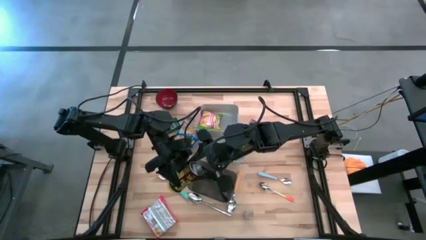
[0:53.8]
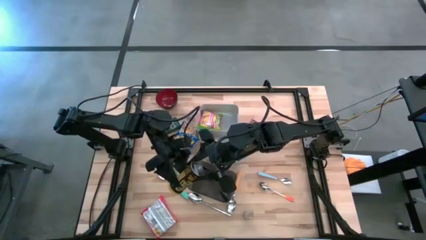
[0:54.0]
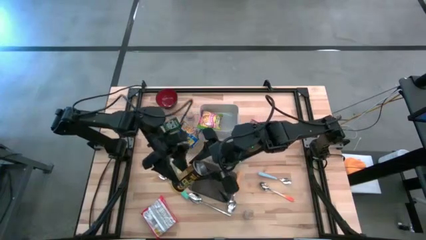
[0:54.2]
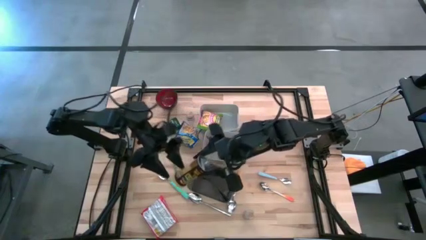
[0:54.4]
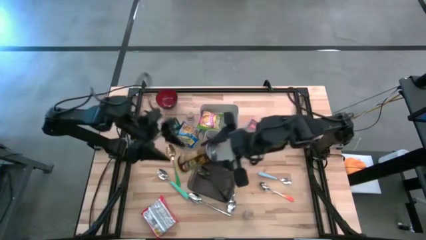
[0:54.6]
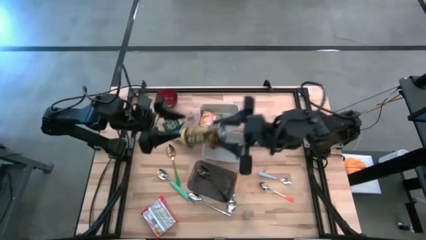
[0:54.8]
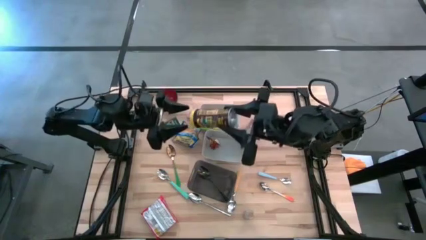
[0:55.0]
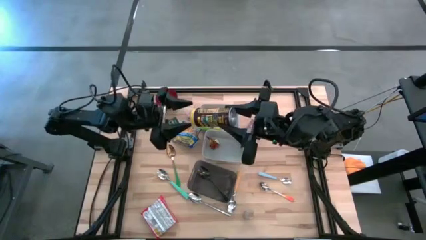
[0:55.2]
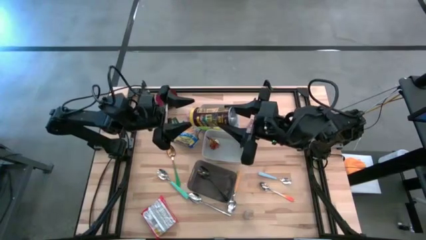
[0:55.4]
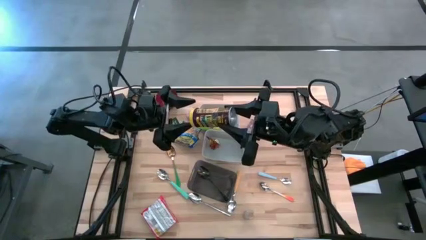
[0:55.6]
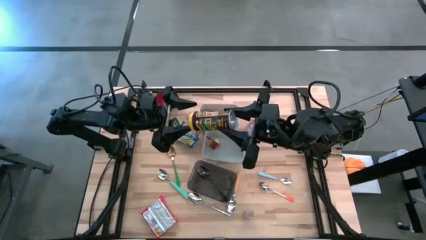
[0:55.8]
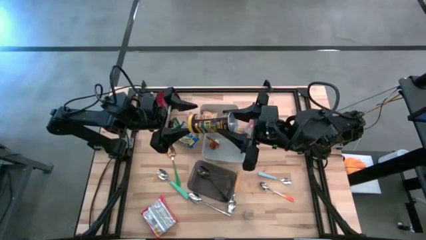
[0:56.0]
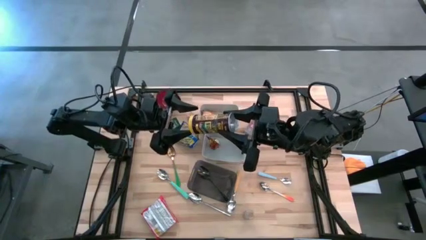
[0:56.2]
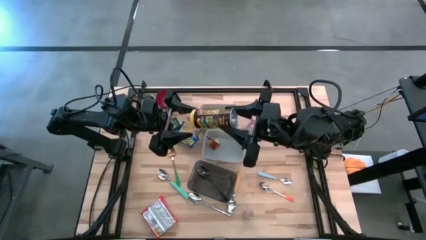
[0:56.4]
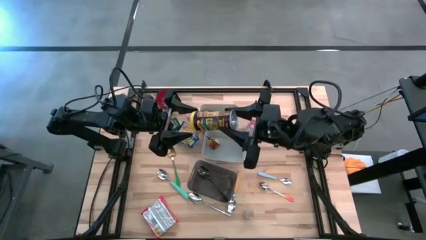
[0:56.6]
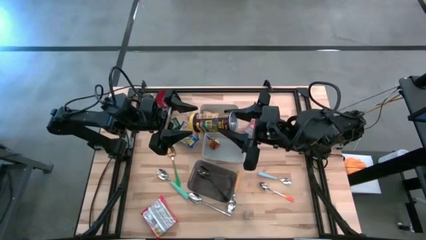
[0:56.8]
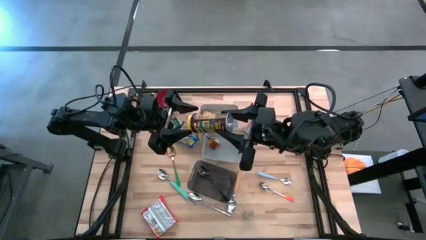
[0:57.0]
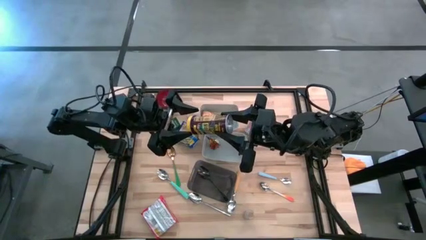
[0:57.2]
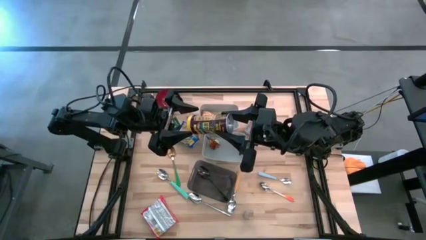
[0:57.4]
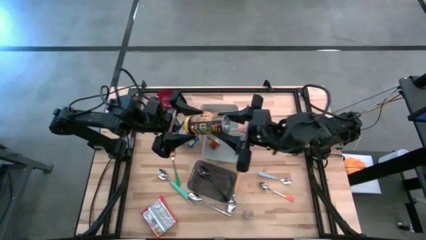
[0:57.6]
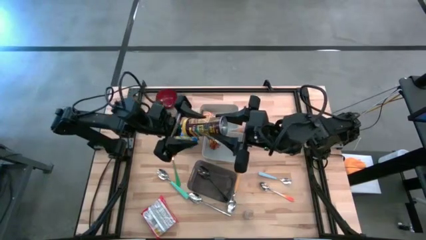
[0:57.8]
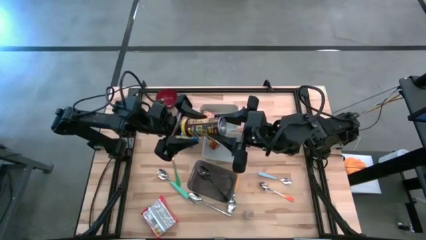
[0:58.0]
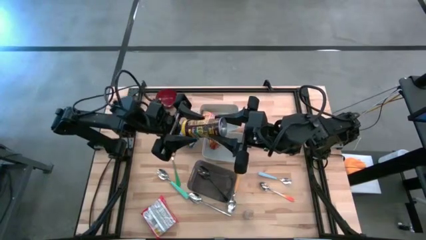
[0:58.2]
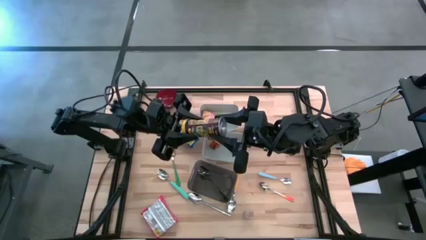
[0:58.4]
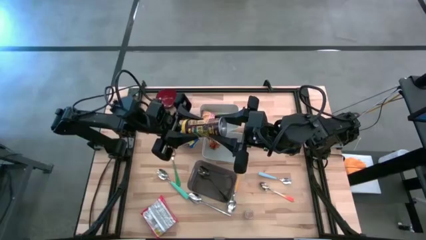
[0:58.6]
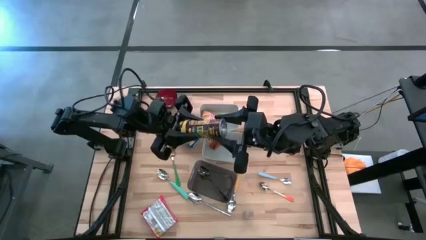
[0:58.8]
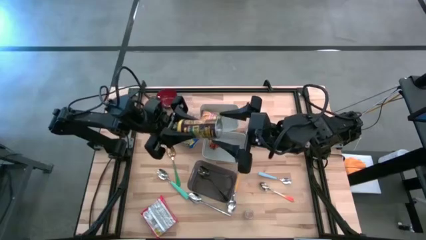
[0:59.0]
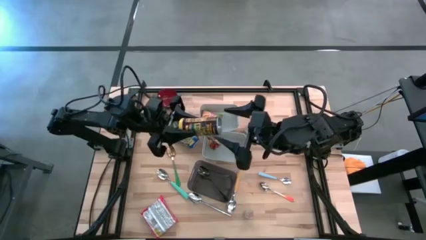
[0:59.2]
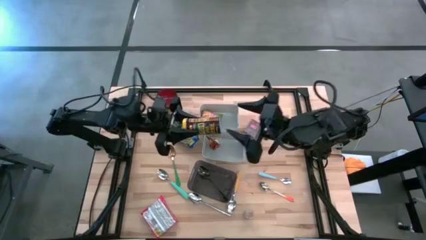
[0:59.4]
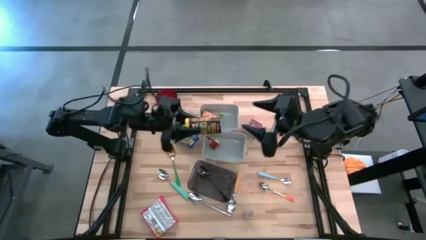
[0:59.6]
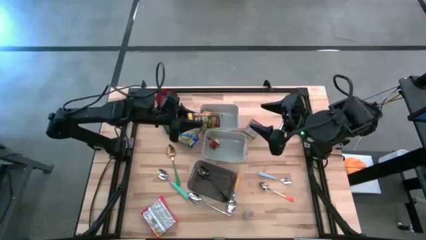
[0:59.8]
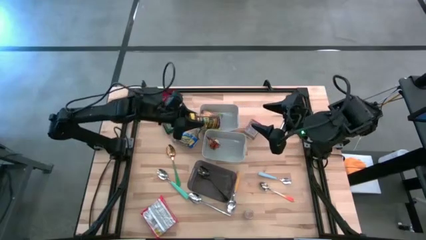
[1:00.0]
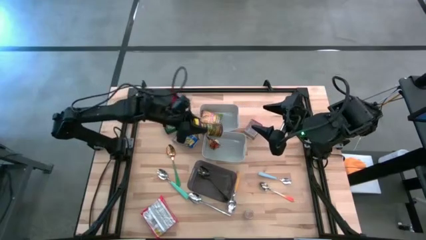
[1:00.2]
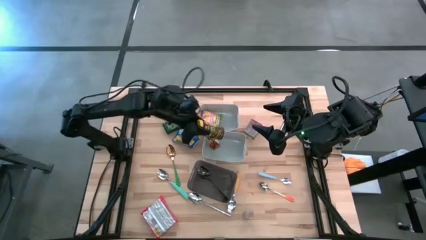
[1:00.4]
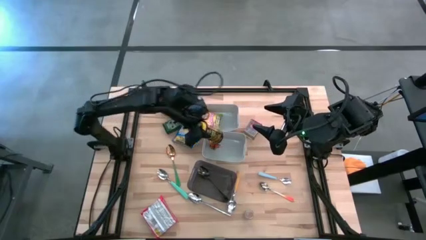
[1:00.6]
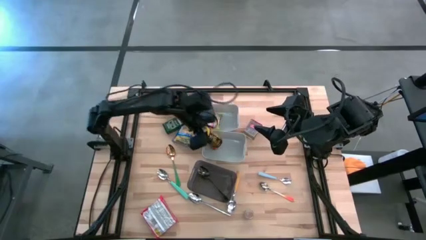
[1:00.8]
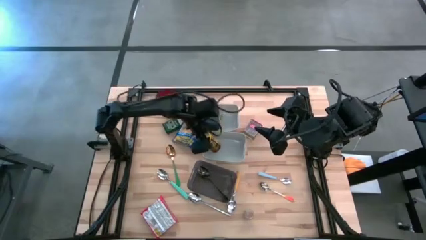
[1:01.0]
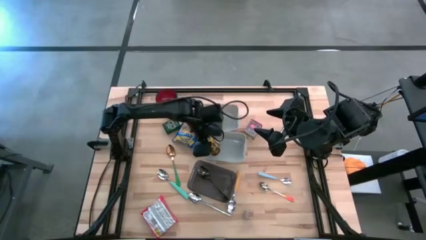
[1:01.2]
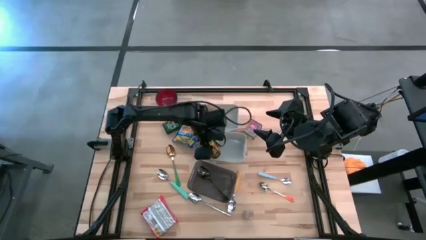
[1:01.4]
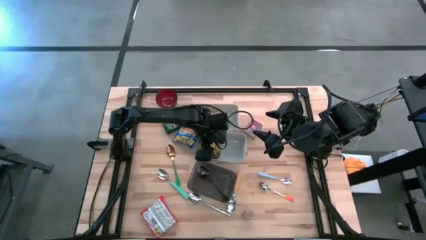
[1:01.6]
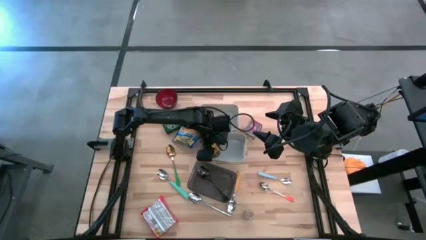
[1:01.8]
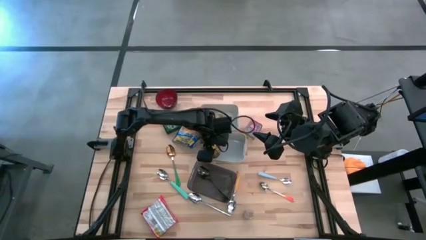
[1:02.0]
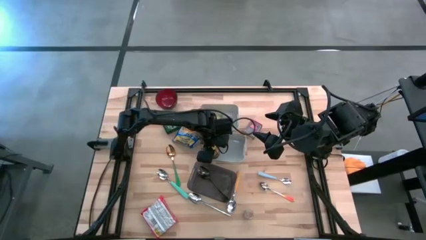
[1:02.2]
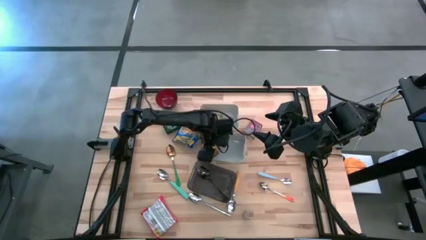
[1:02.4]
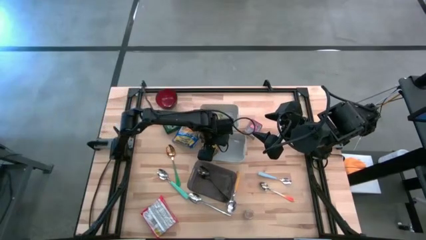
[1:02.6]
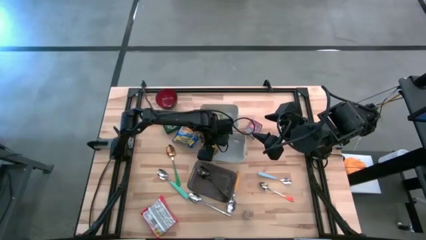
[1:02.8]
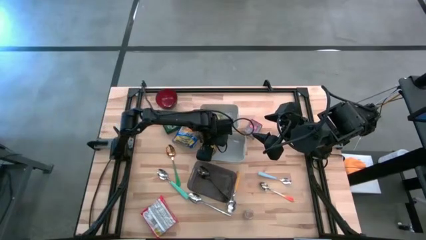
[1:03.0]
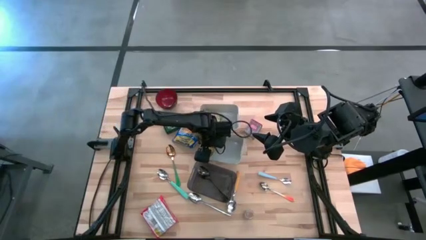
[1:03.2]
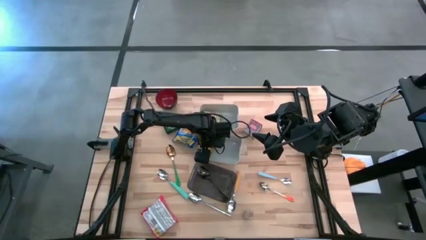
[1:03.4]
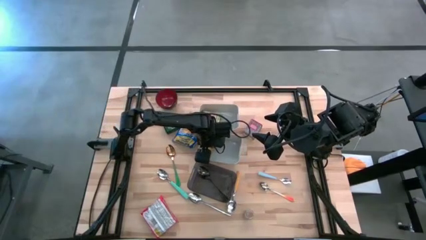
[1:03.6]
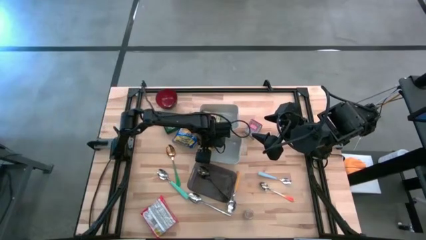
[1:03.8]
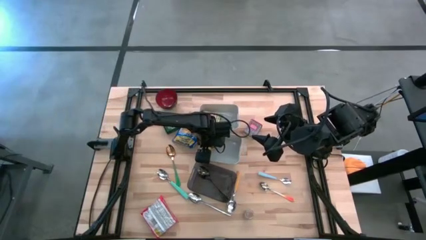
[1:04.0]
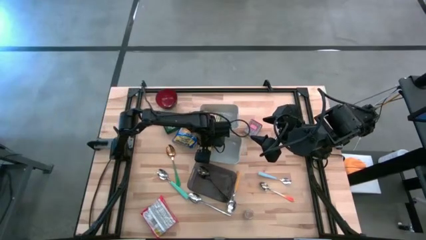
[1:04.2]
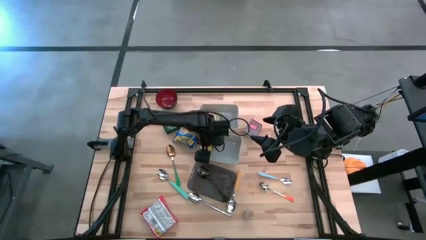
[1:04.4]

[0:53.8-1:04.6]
Put the yellow seasoning bottle into the bottom gray bin
